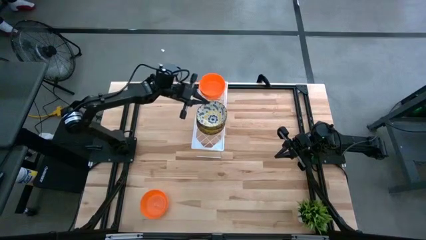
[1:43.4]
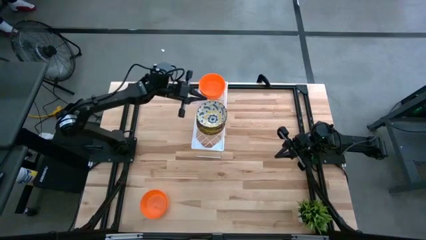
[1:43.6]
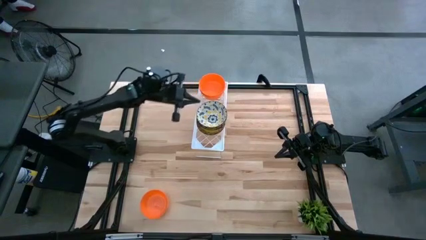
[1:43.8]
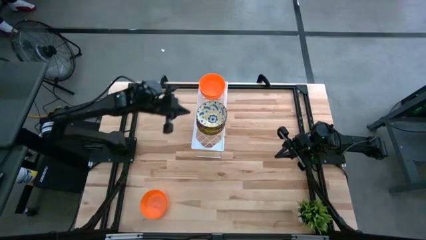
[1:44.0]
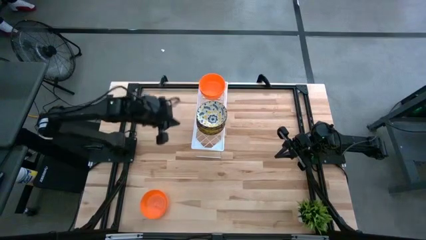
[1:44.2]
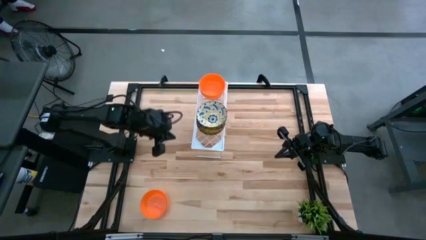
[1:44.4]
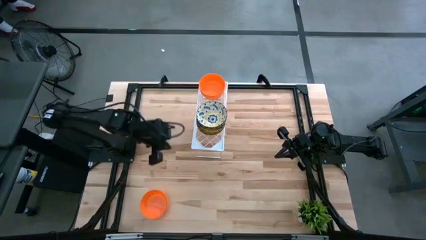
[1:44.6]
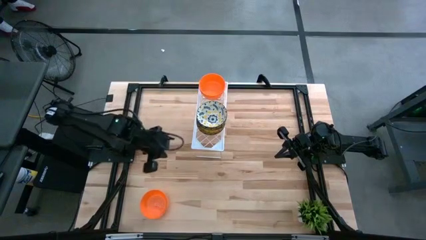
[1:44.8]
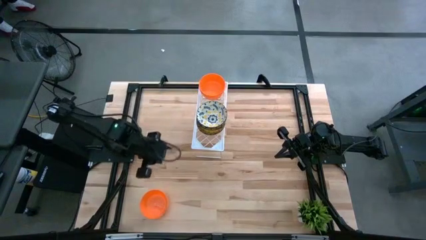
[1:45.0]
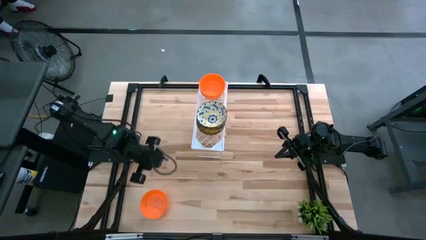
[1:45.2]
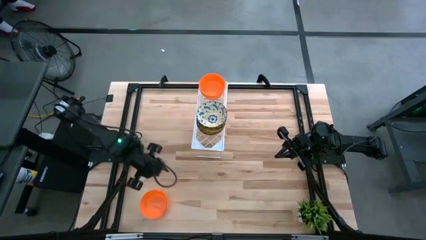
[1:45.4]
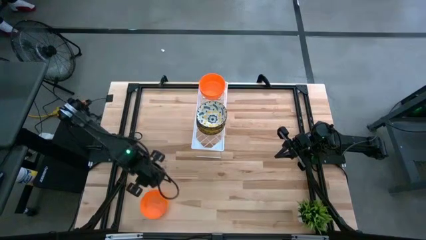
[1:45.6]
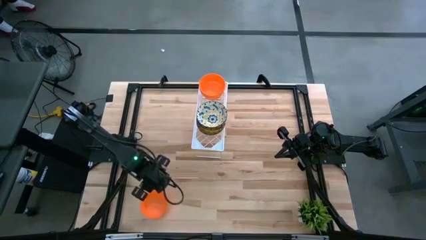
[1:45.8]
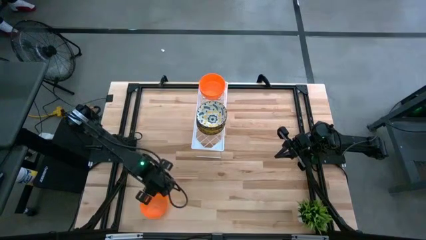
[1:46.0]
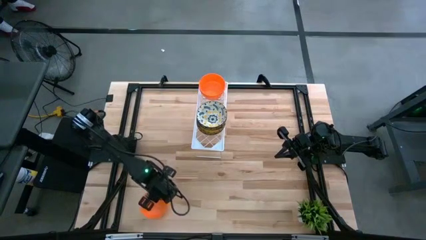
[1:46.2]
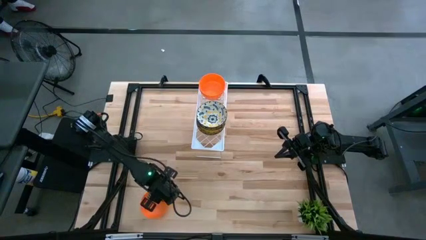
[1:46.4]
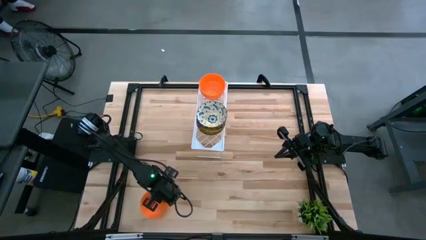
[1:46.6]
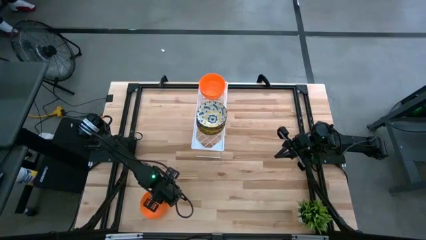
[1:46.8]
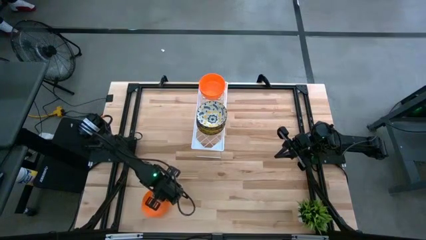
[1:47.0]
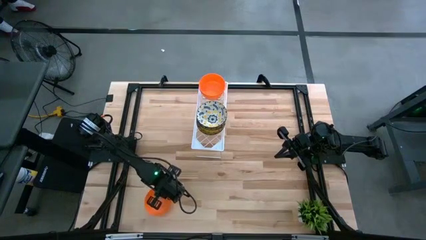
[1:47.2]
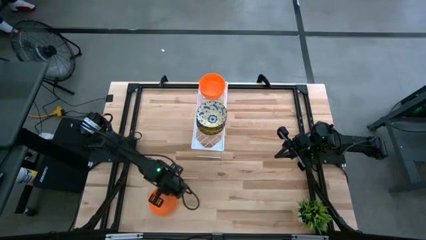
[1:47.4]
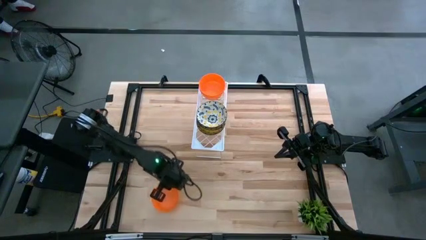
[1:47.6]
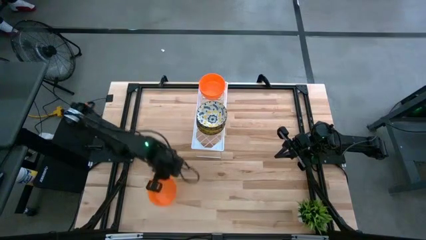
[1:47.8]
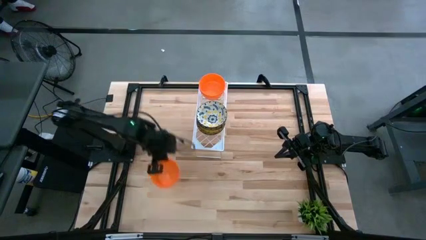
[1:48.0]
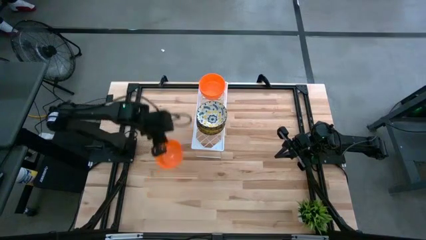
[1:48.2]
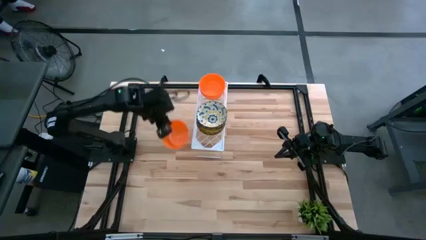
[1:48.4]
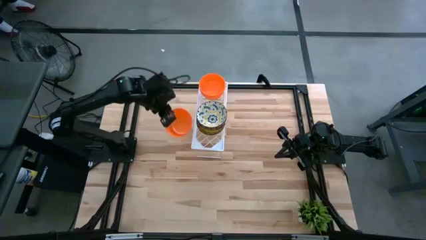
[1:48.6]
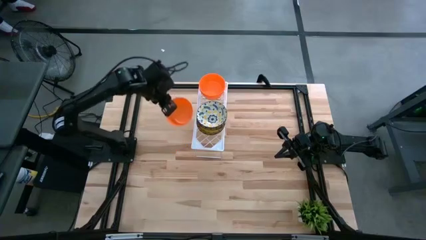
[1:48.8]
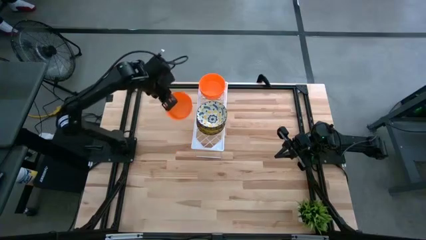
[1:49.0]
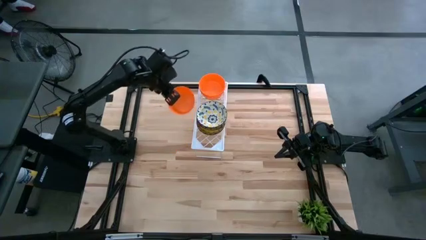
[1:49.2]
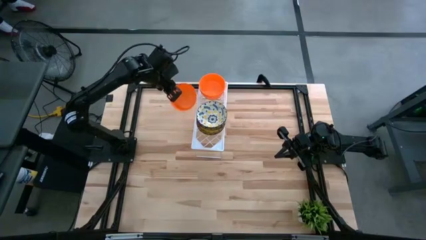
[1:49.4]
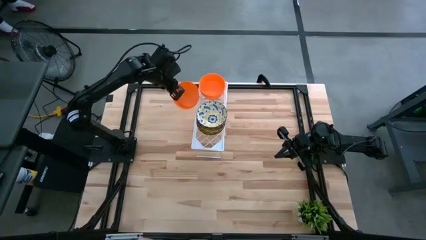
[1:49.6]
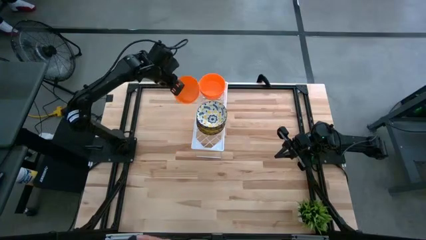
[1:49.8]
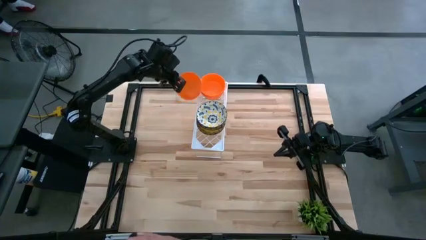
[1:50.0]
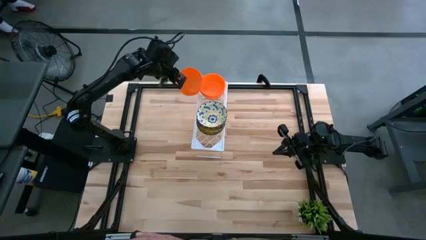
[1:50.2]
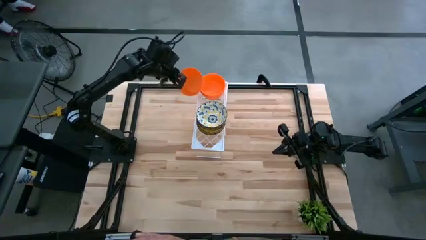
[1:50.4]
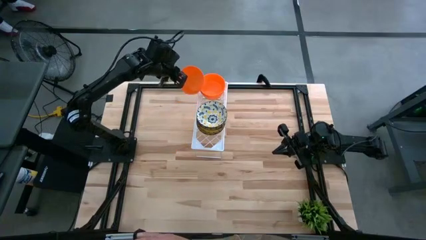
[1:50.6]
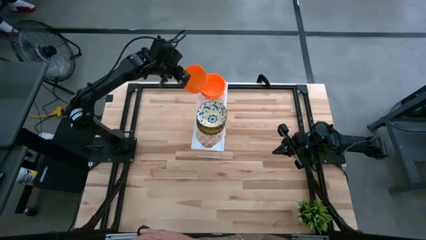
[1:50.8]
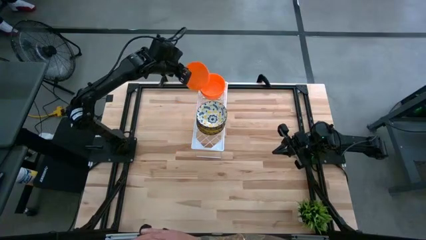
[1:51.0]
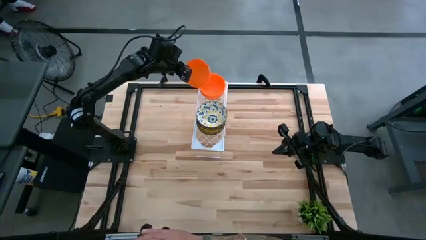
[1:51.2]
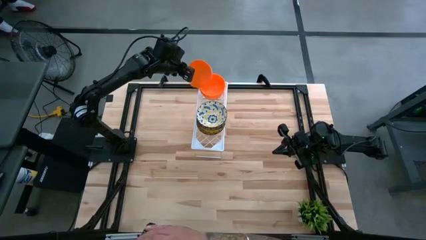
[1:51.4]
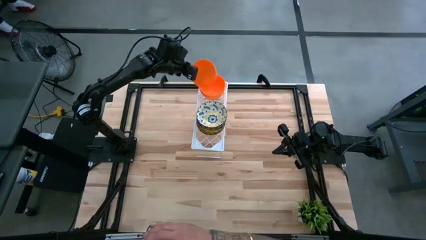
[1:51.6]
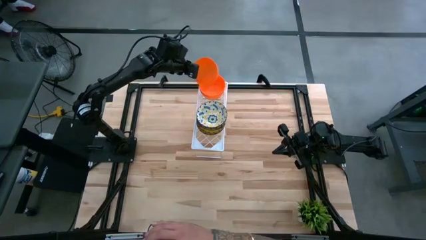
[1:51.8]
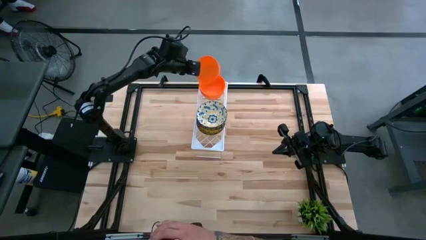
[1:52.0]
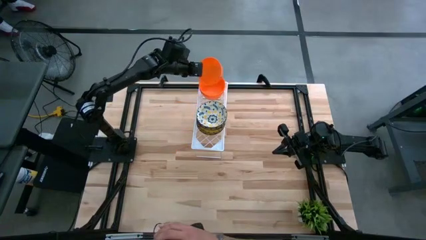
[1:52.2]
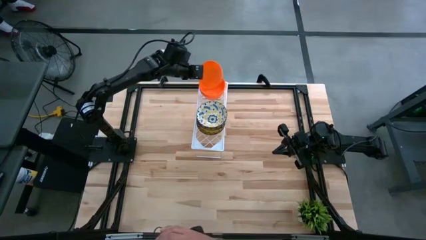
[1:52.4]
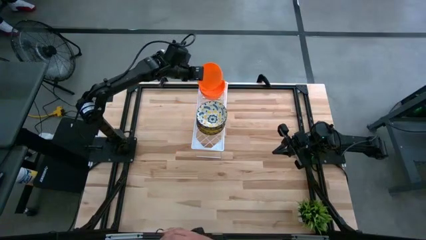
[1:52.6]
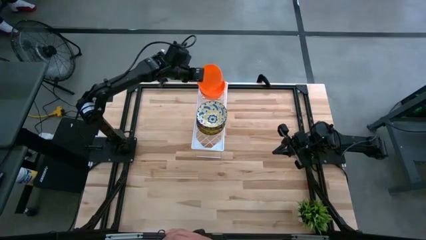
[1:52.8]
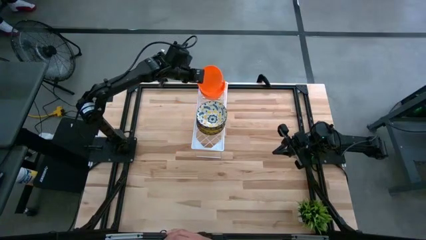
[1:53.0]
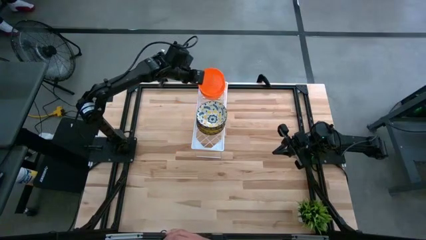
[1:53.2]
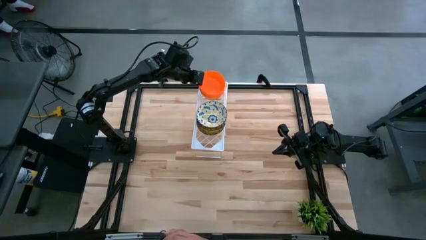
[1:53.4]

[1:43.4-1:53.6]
Task: Pick & Place Mini bowls
Stack the orange bowl on the stacked orange bowls on the shelf

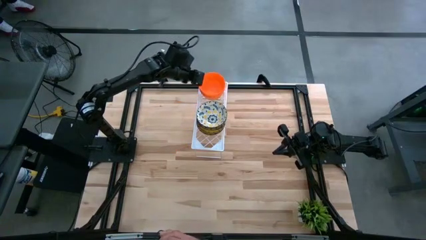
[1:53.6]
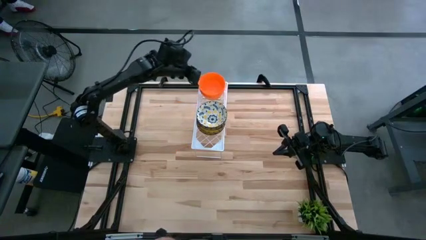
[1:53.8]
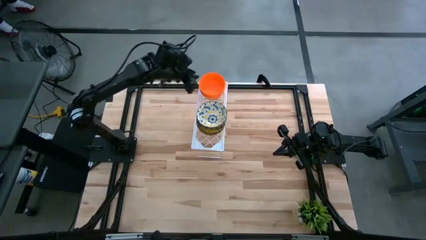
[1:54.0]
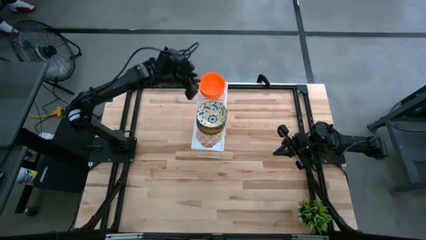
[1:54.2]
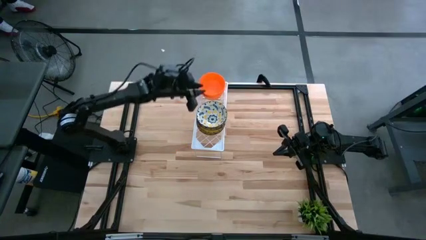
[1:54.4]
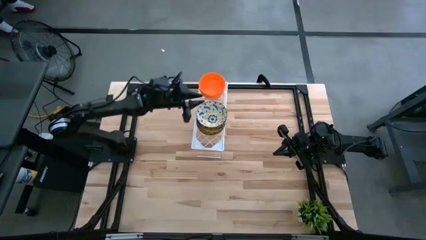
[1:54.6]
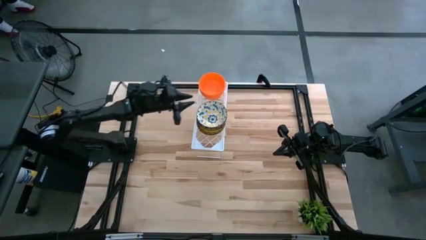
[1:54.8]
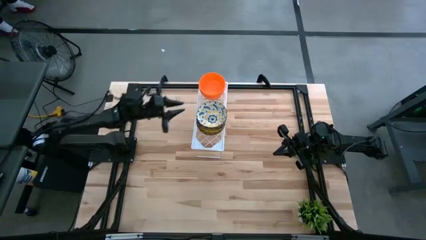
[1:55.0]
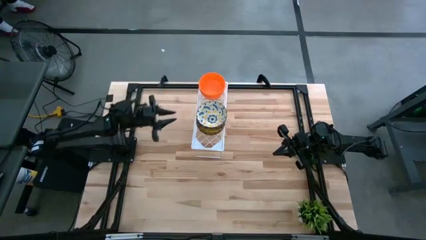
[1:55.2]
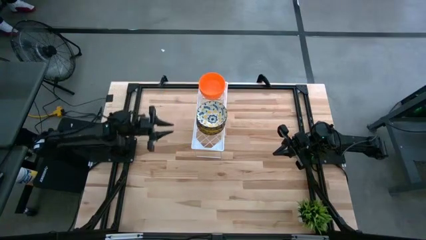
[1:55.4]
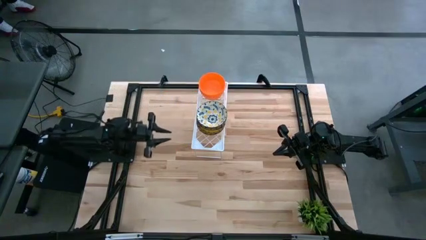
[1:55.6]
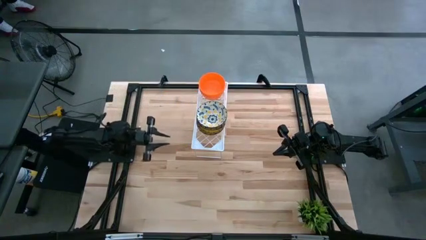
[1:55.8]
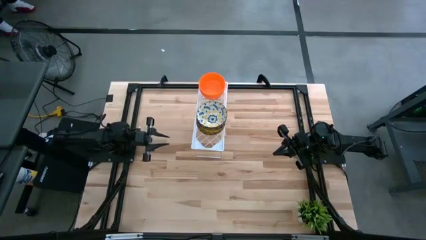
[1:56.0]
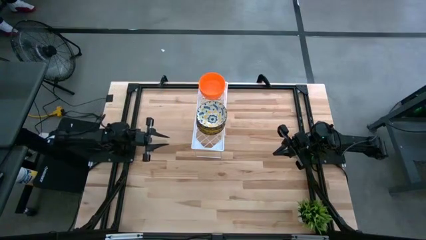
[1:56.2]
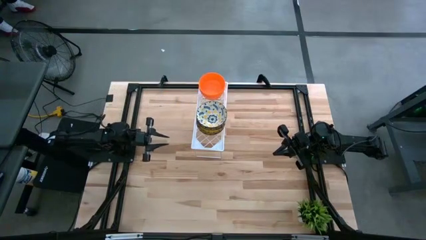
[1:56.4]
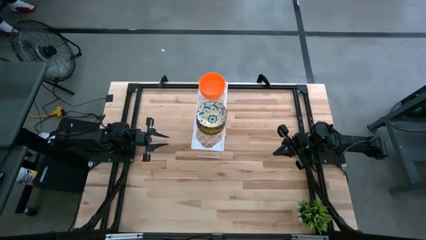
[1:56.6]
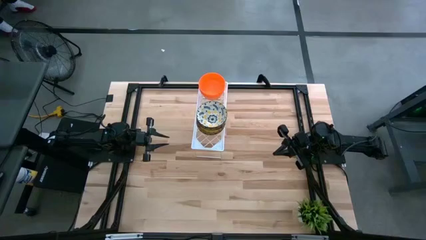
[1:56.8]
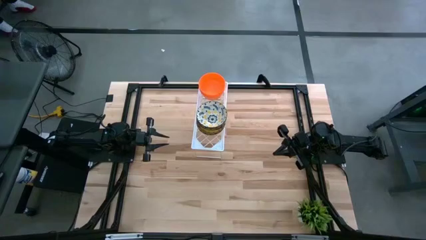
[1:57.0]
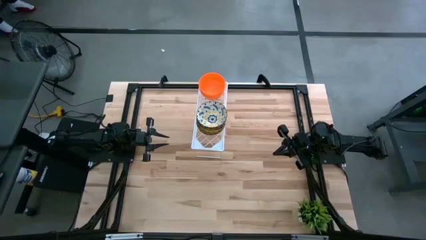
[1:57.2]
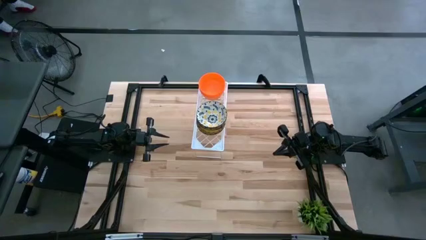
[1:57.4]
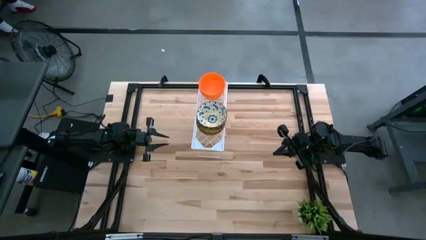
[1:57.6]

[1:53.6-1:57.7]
Return to Home Position

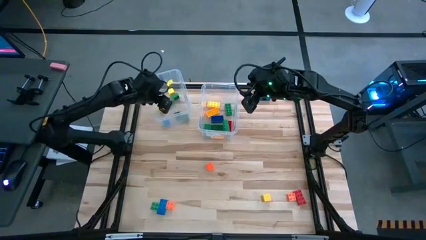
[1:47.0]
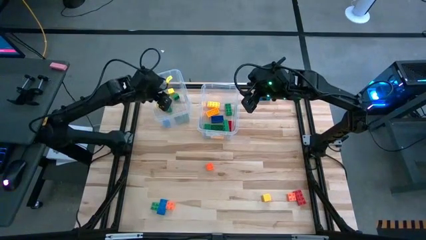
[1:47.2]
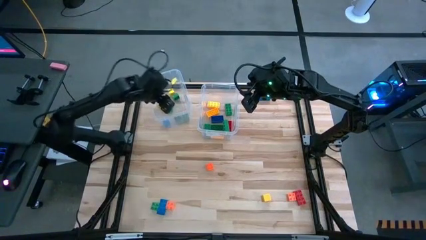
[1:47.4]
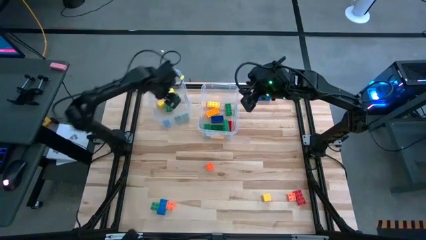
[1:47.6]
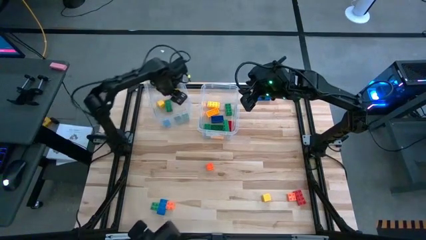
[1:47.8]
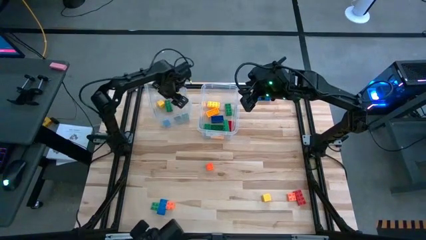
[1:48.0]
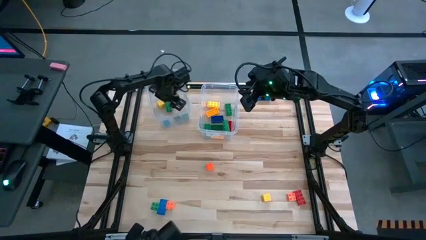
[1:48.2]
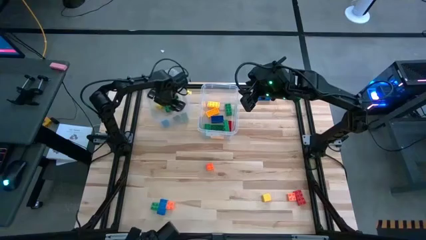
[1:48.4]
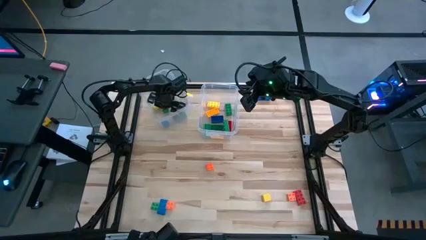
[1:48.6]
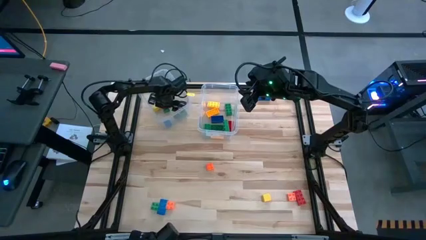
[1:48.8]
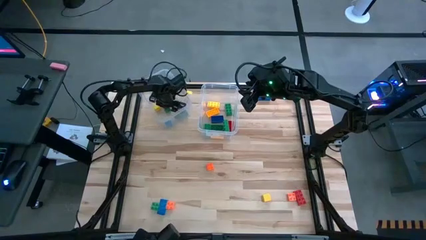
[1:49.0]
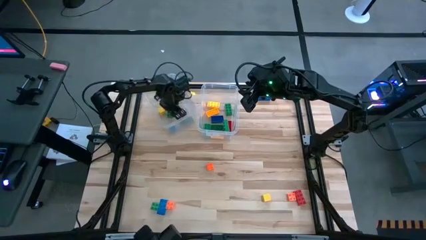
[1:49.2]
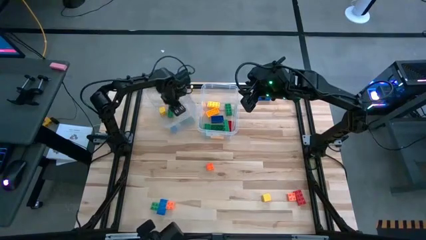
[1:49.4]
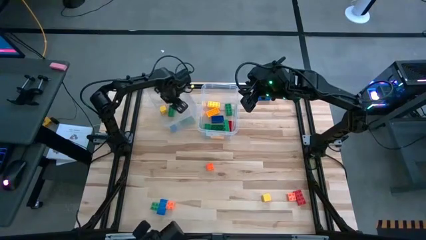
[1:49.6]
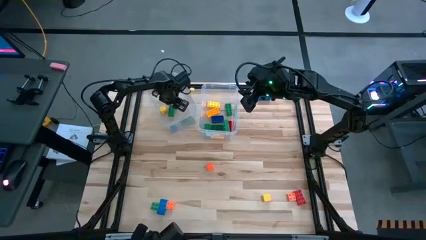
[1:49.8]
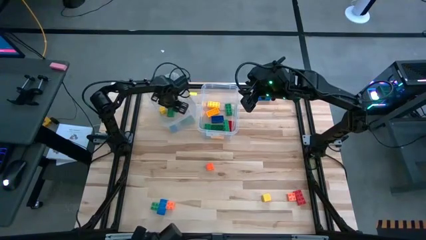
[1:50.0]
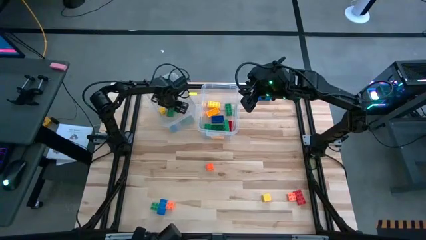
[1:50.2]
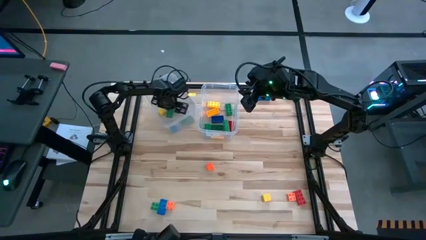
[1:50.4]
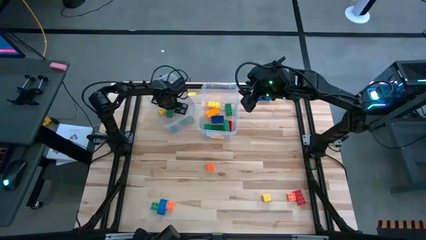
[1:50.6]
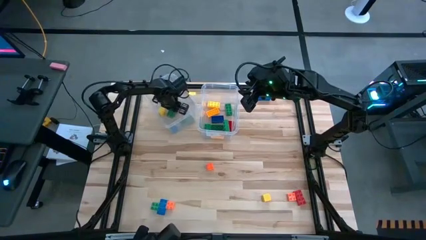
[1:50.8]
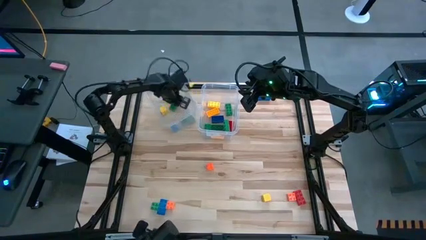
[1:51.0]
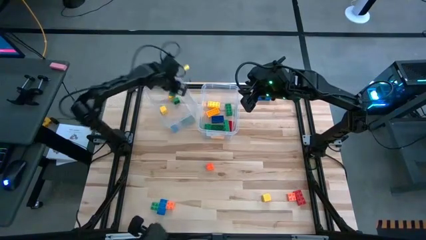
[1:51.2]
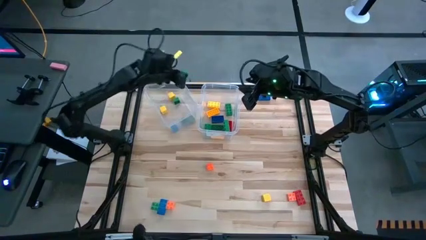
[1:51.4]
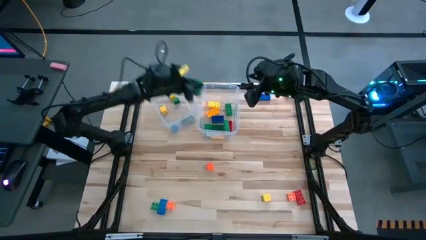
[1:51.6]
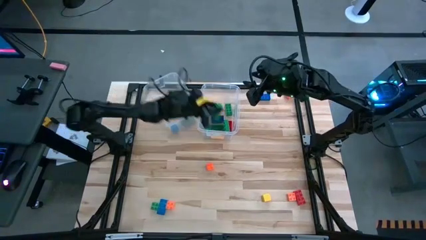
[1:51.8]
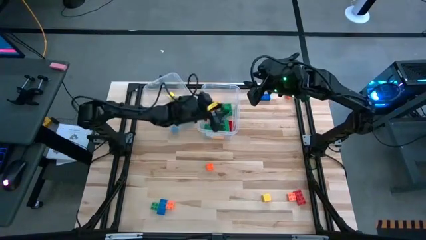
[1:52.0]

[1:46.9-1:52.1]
Task: Sort blocks by size
Put the green big game piece into the right transparent bin
